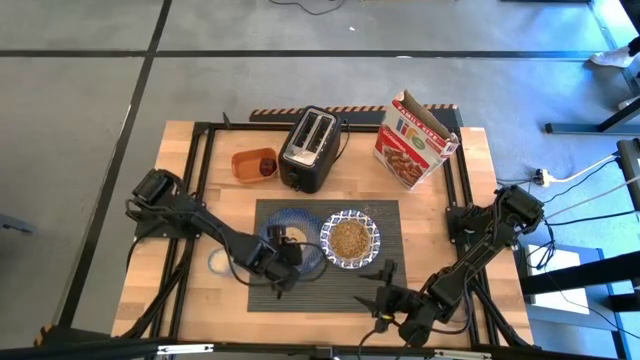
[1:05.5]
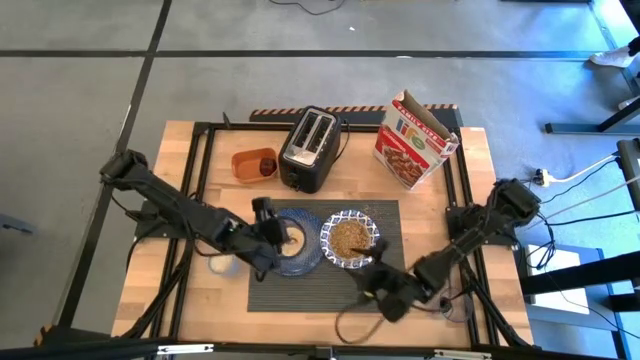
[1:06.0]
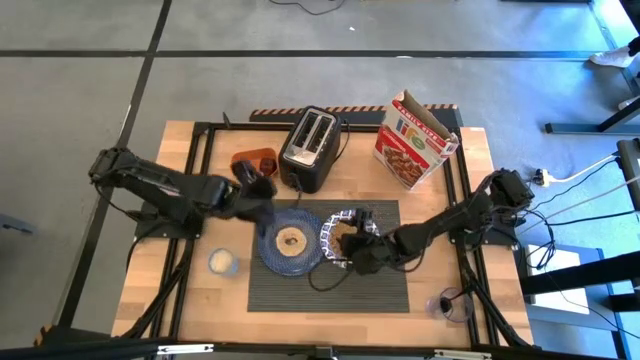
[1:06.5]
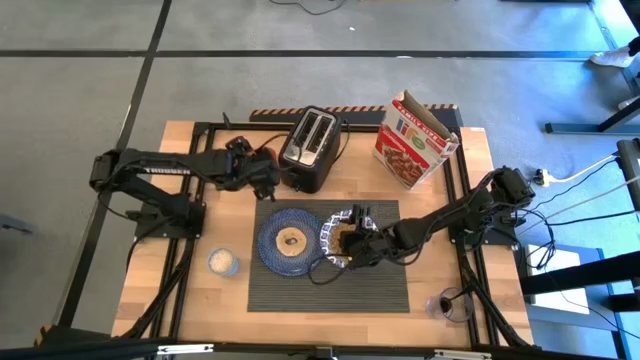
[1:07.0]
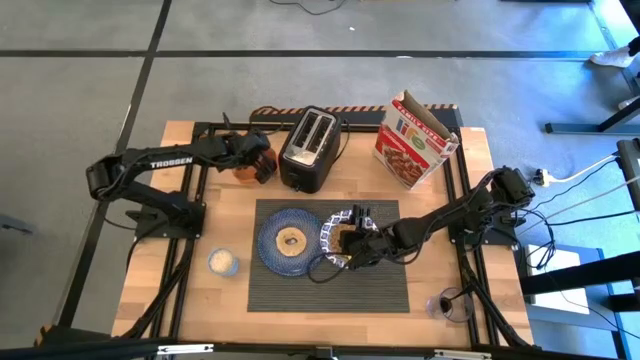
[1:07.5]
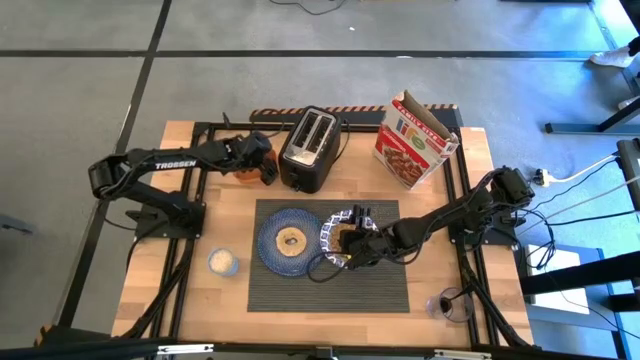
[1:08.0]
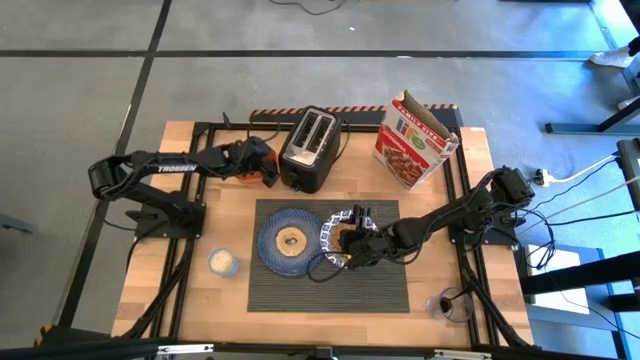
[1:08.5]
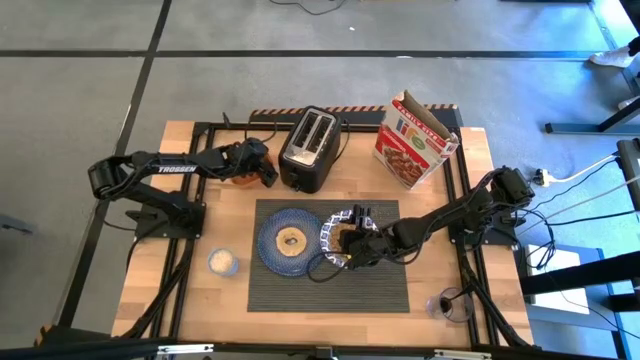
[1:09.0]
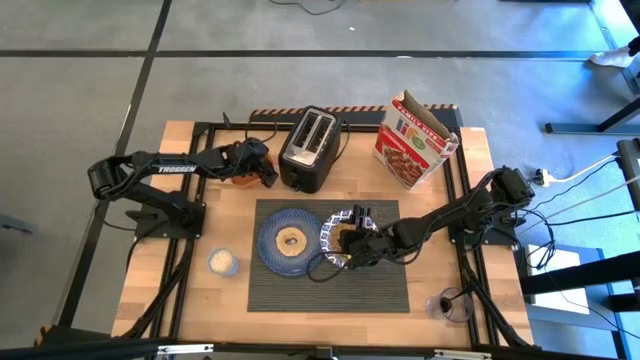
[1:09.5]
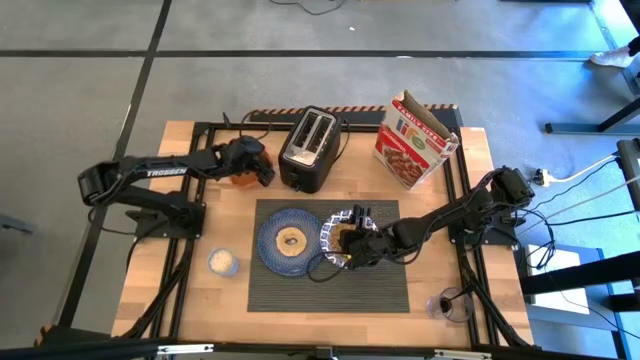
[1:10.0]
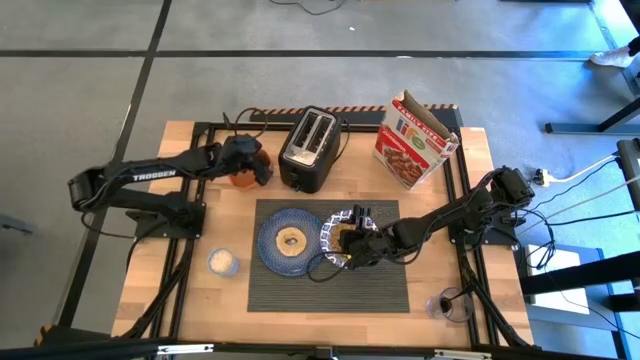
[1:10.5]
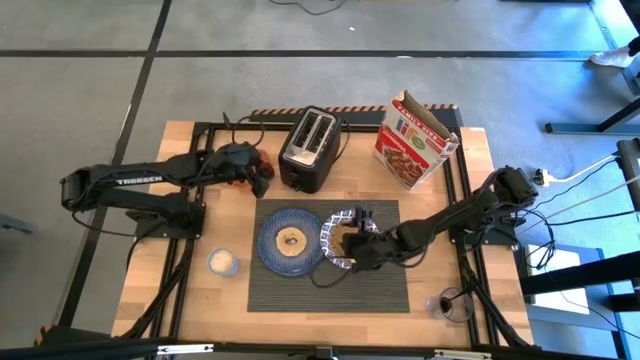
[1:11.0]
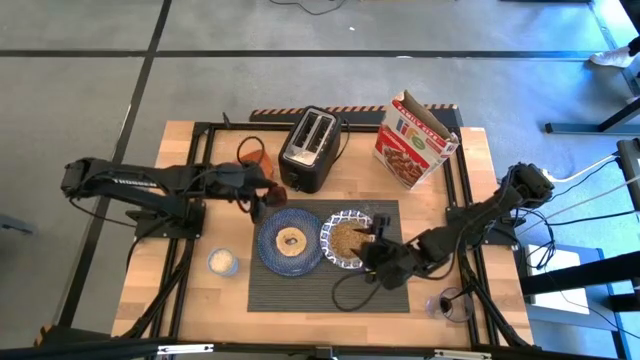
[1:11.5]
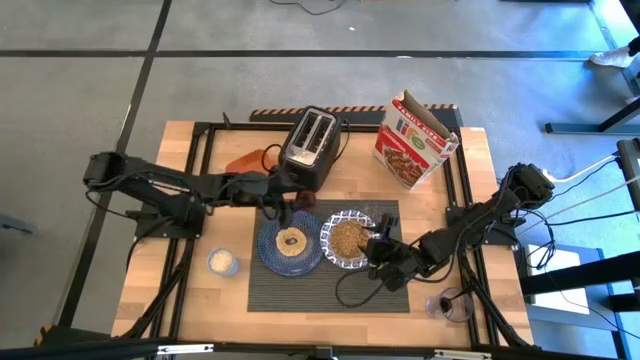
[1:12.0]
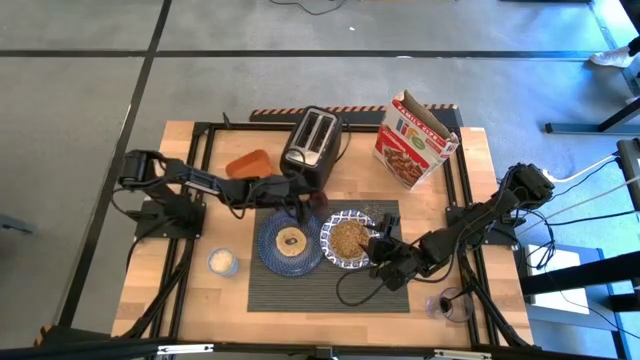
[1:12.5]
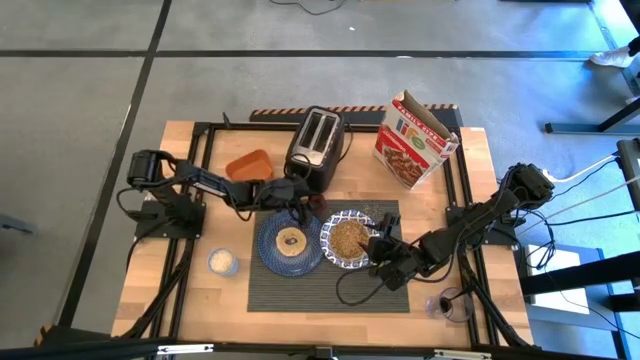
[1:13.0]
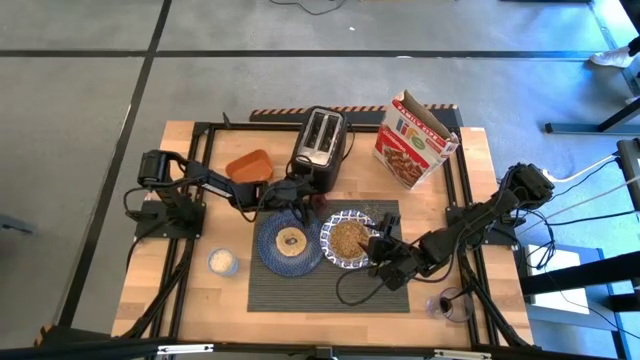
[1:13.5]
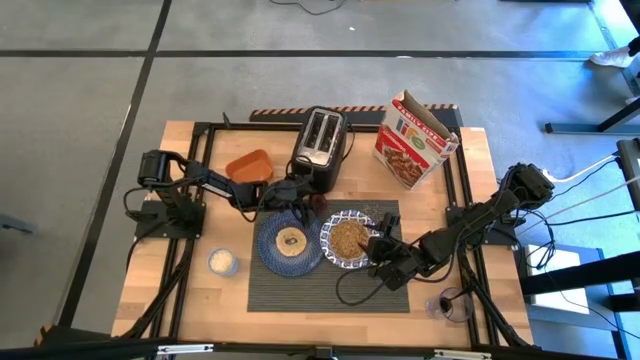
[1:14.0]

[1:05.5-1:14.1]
Task: Arrange a breakfast setting
Put the apple on the placemat in between the blue plate and the blue patterned bowl from the orange bin

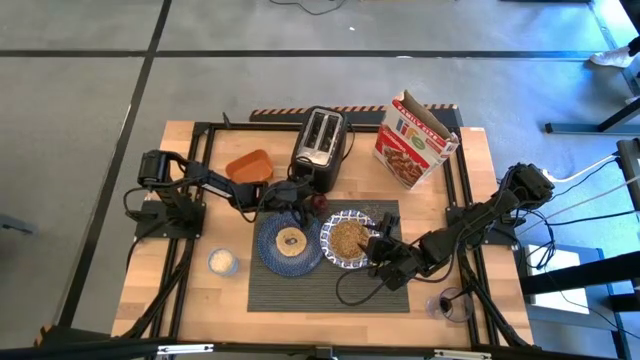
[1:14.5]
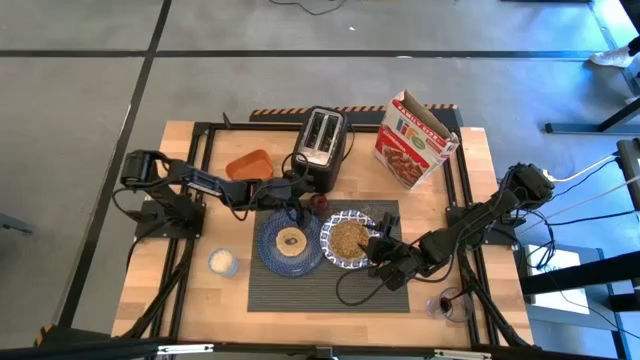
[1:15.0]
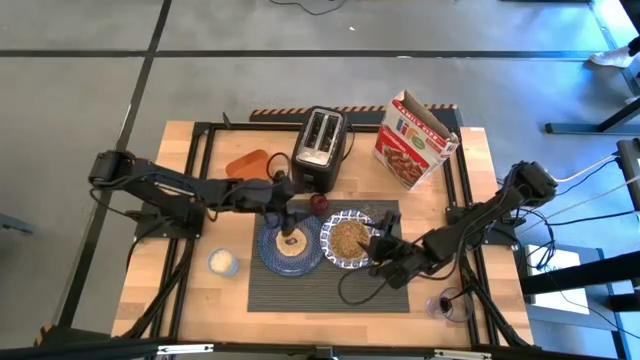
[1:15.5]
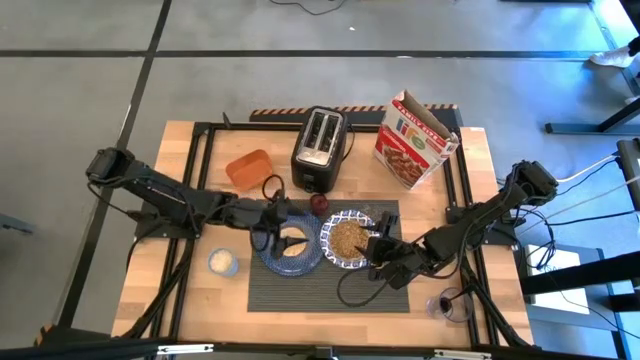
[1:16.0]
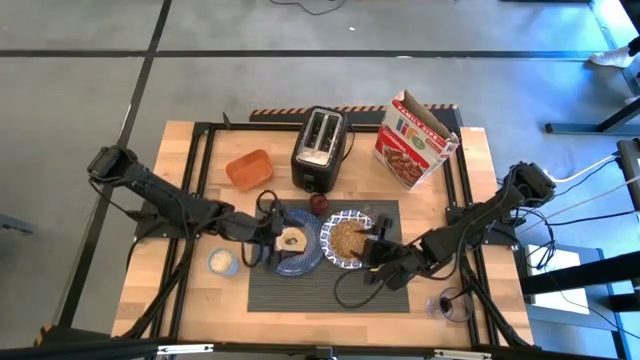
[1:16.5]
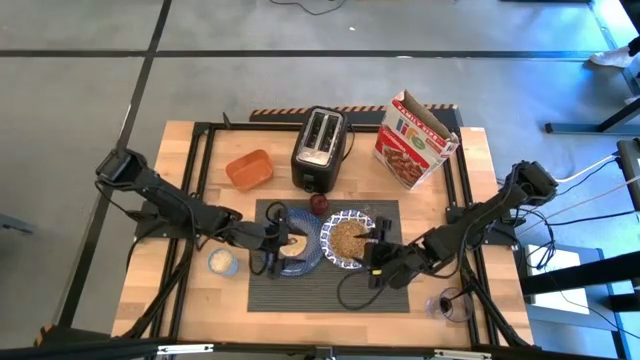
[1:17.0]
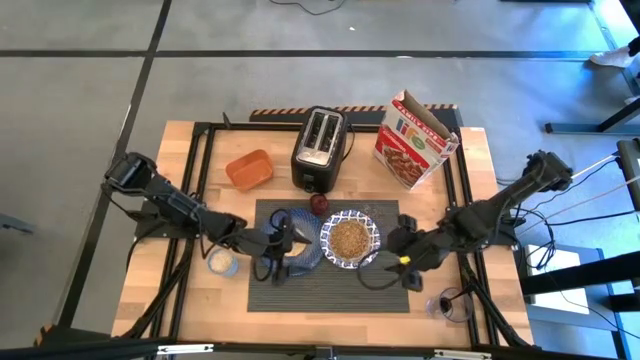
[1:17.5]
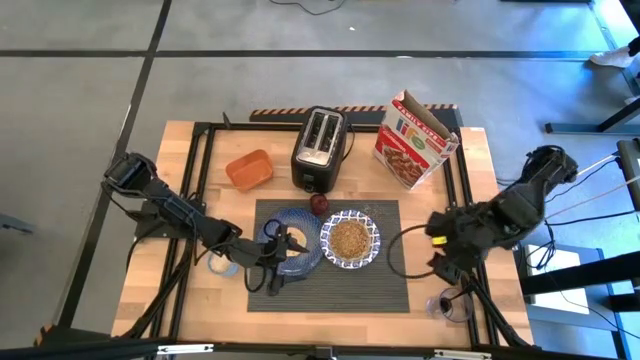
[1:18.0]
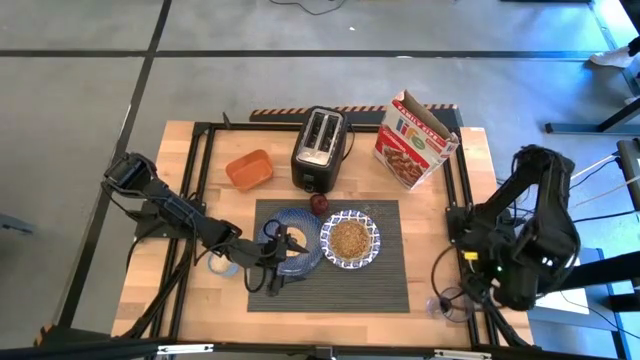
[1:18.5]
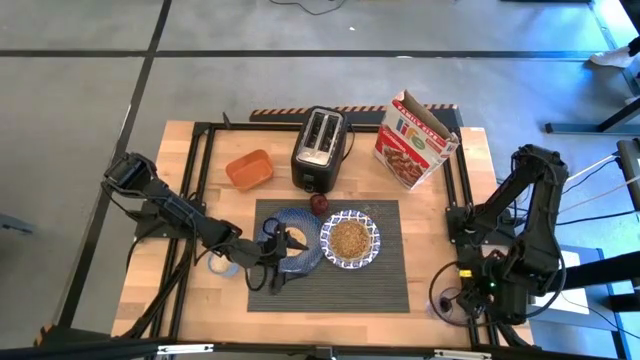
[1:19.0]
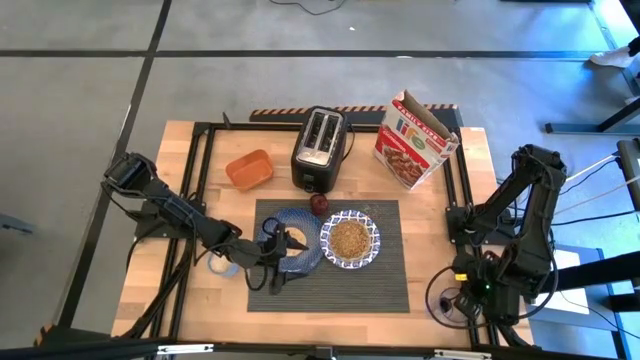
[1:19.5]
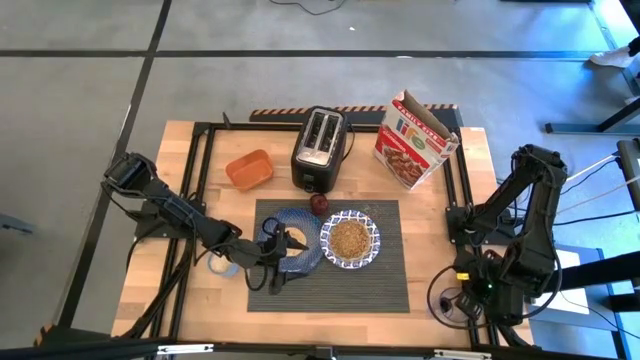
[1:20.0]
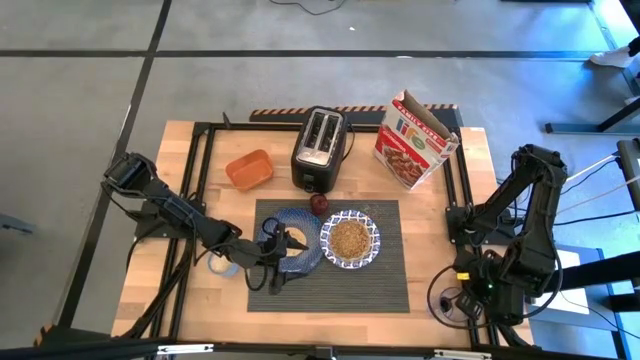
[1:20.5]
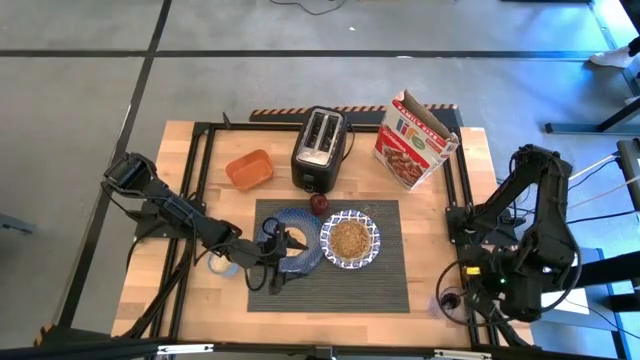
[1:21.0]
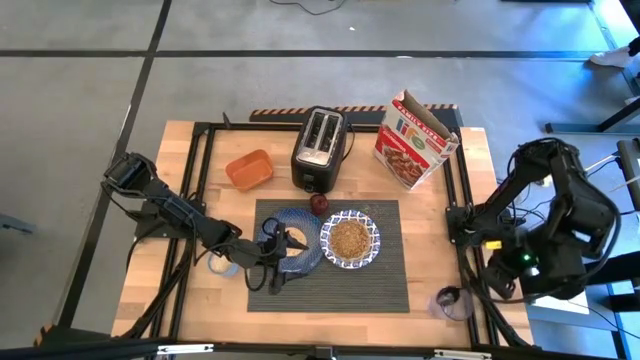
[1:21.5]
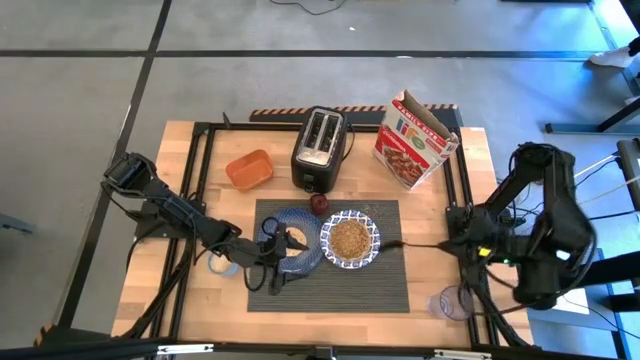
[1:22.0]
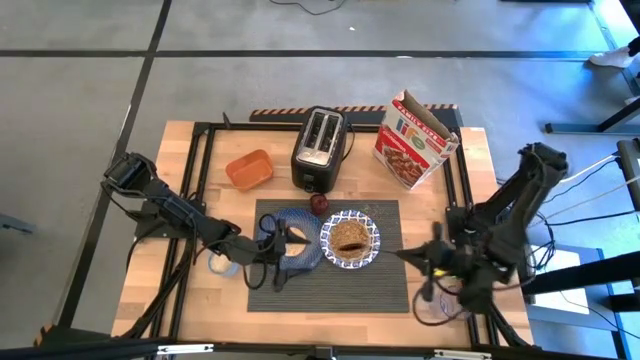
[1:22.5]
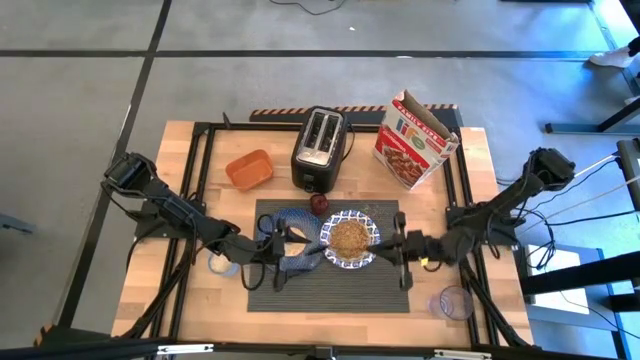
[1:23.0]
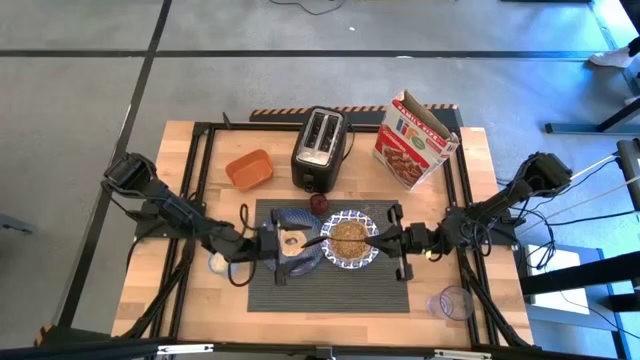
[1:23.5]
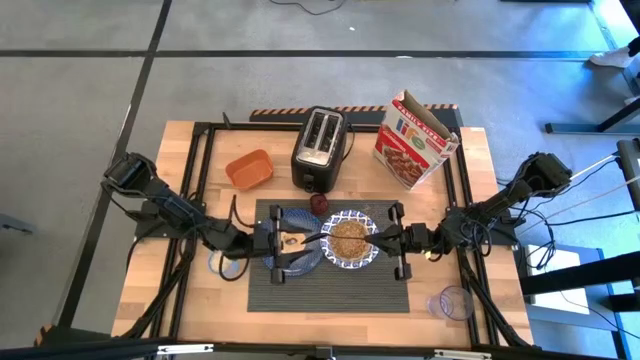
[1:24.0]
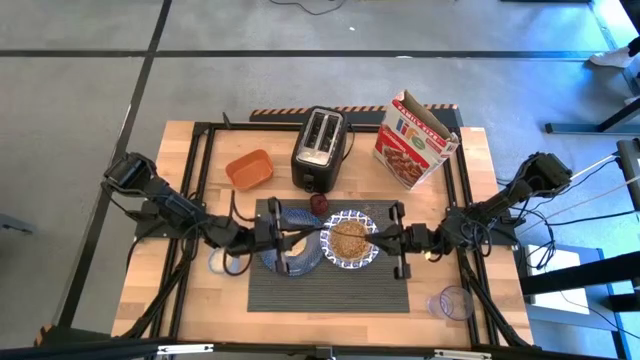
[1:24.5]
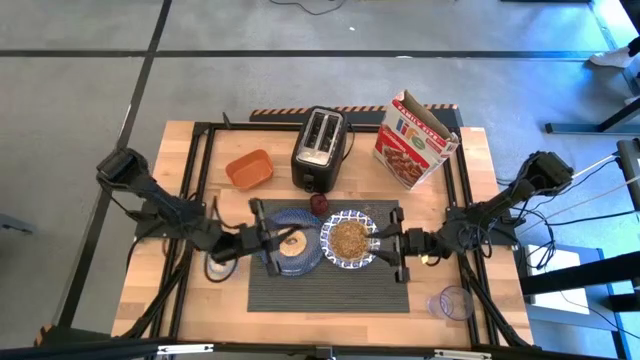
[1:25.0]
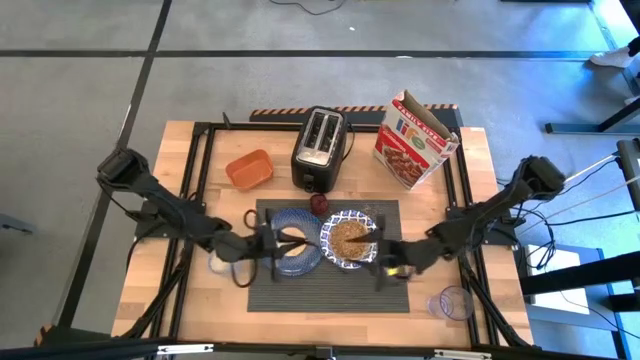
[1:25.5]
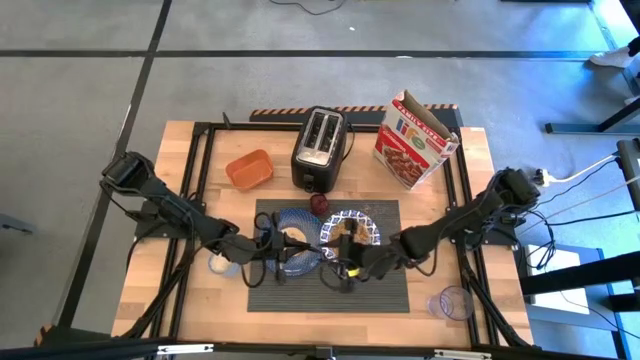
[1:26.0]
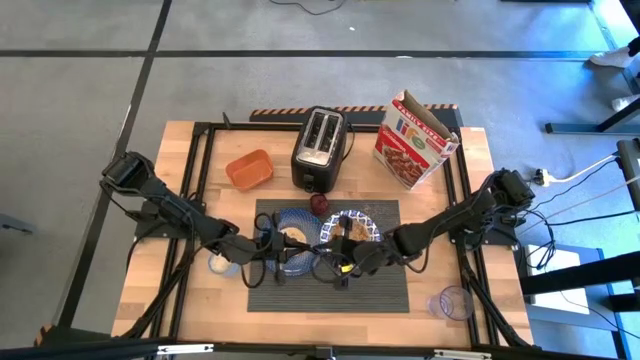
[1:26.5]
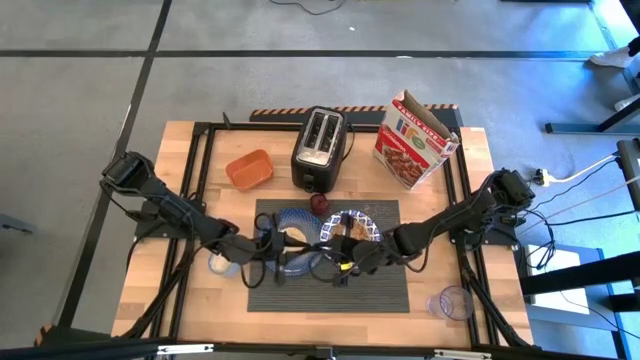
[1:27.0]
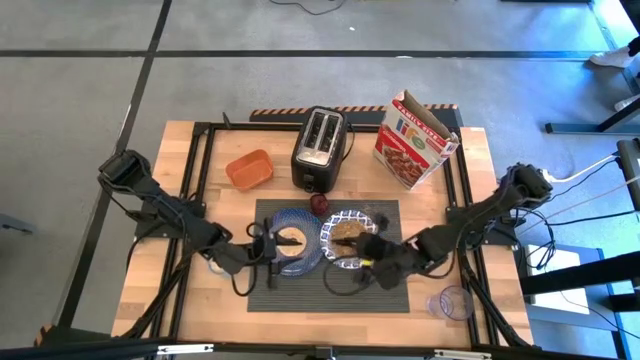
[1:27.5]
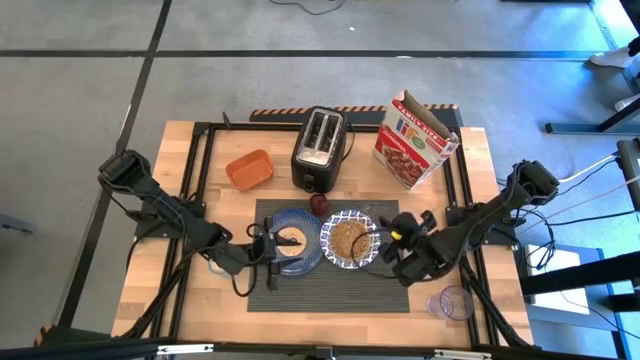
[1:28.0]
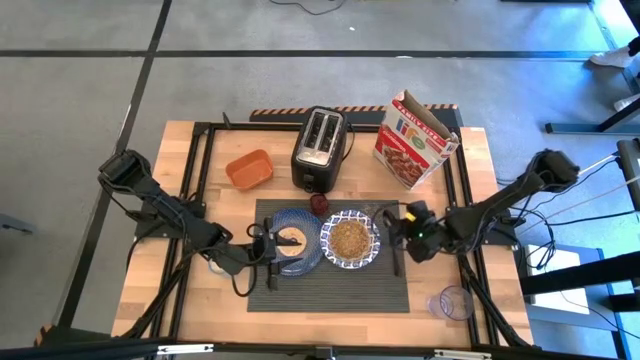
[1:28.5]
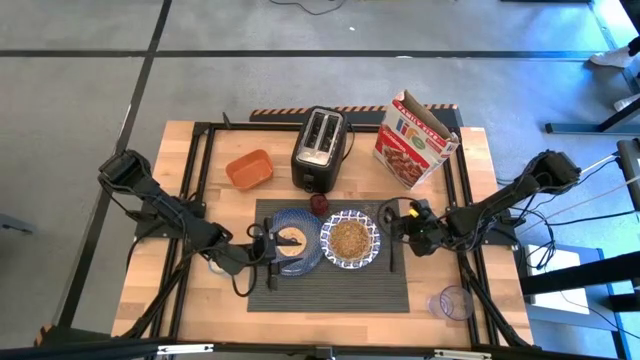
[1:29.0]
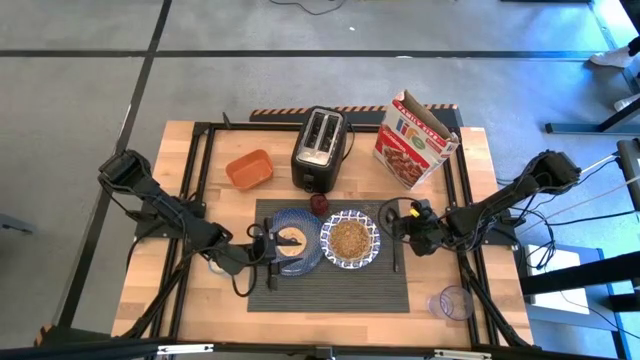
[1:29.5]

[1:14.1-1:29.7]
Put the black spoon on the placemat on the right side of the blue patterned bowl from the transparent glass
